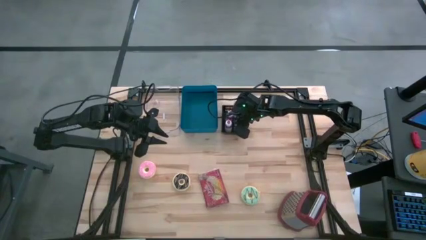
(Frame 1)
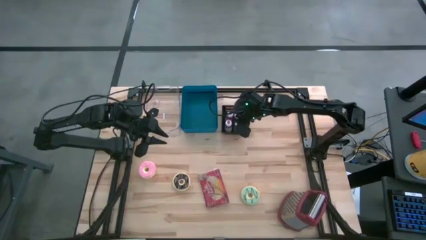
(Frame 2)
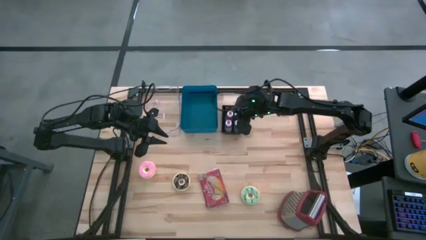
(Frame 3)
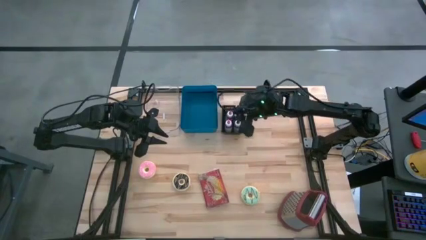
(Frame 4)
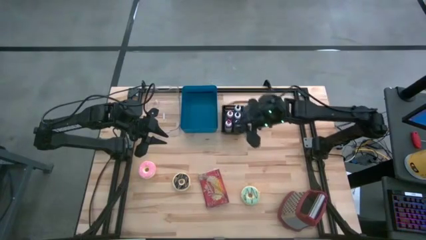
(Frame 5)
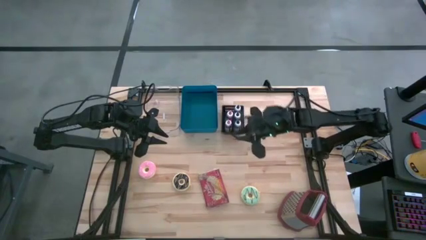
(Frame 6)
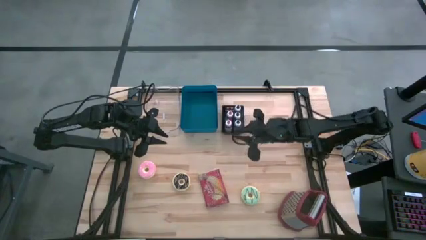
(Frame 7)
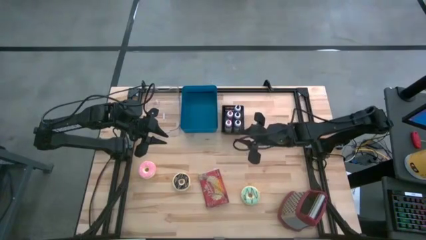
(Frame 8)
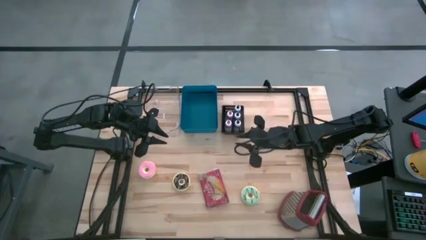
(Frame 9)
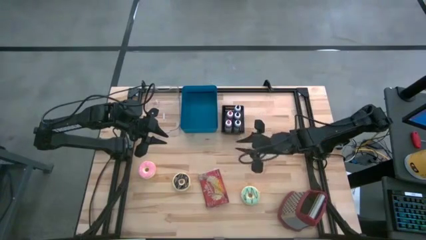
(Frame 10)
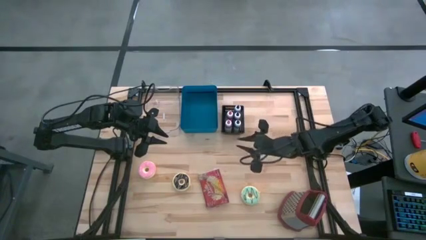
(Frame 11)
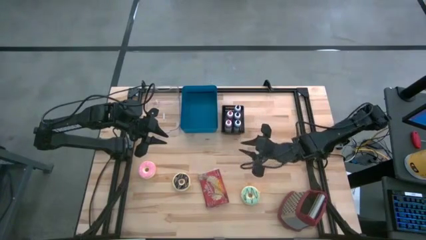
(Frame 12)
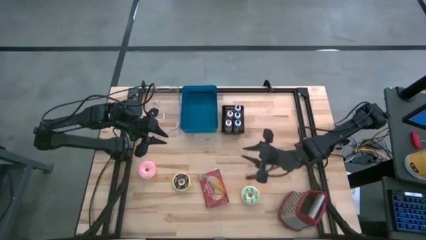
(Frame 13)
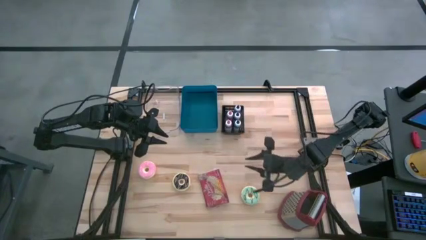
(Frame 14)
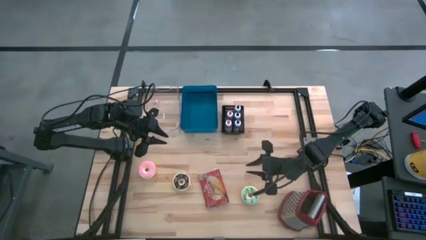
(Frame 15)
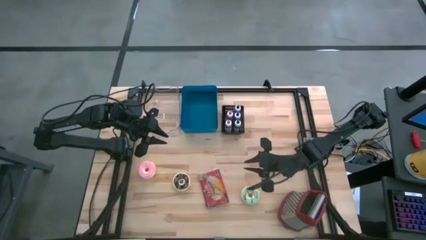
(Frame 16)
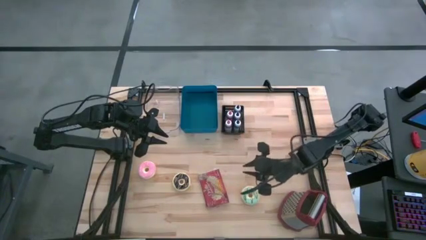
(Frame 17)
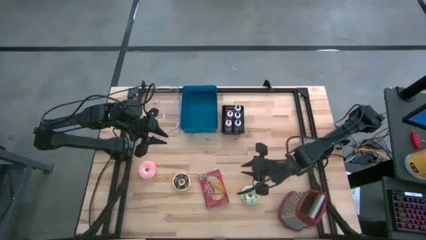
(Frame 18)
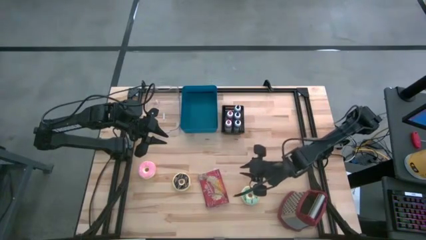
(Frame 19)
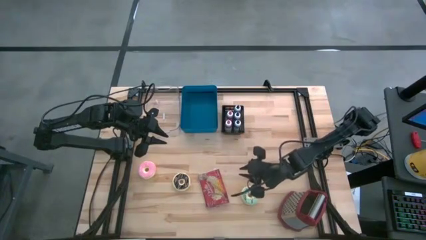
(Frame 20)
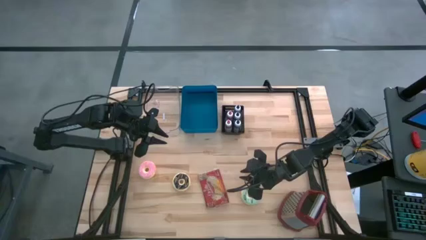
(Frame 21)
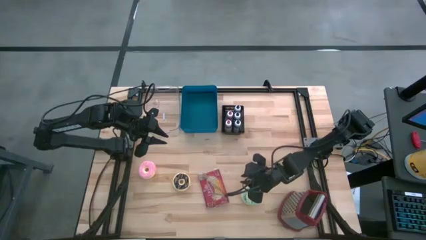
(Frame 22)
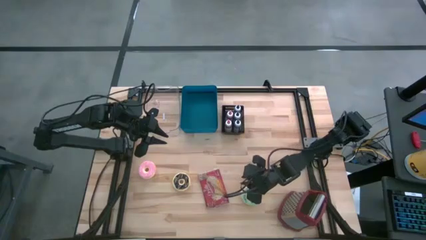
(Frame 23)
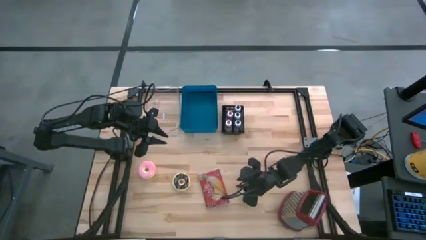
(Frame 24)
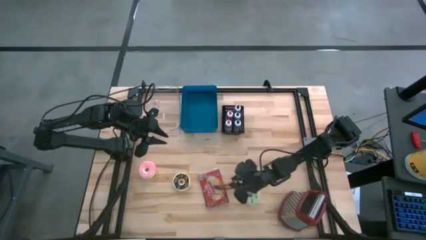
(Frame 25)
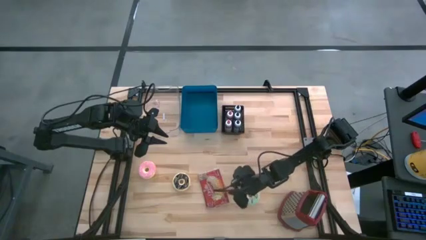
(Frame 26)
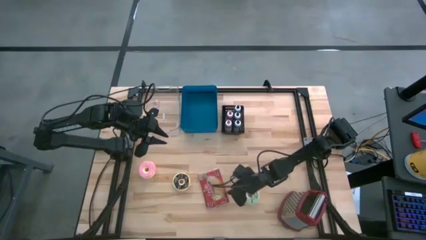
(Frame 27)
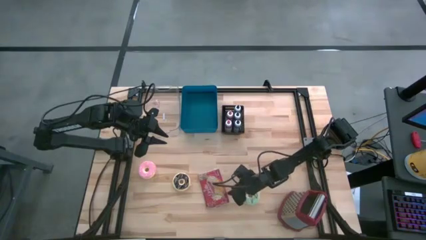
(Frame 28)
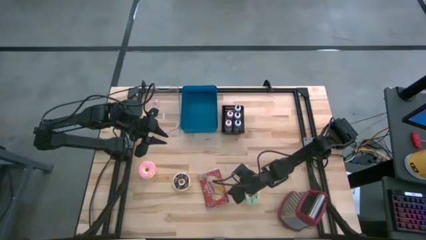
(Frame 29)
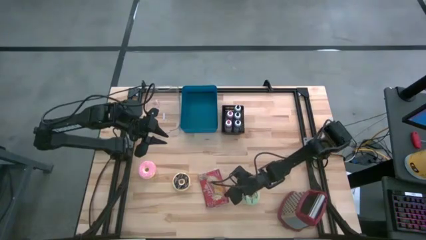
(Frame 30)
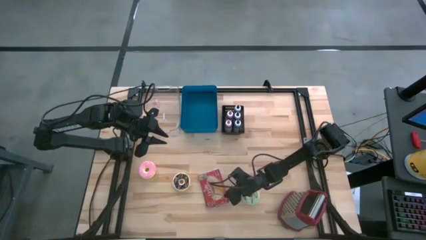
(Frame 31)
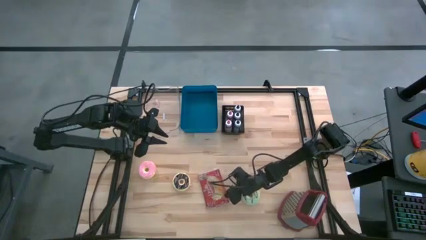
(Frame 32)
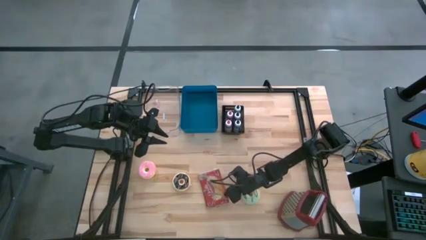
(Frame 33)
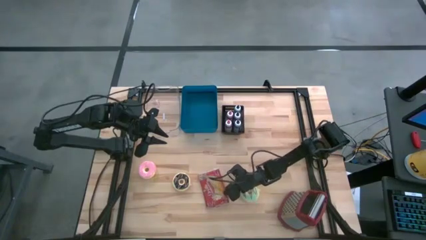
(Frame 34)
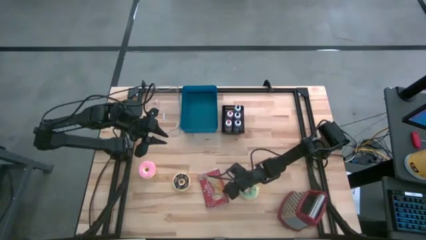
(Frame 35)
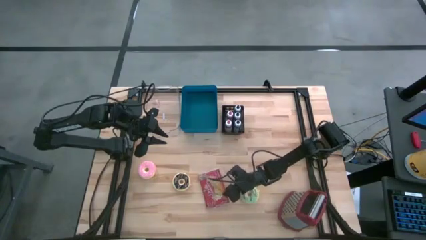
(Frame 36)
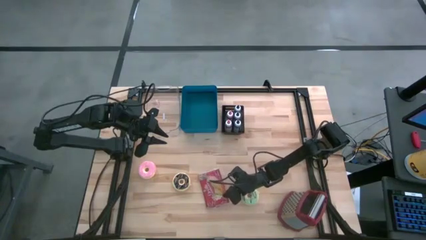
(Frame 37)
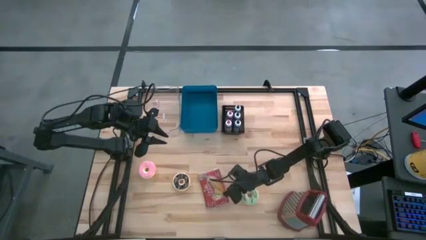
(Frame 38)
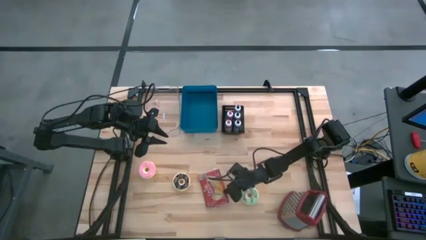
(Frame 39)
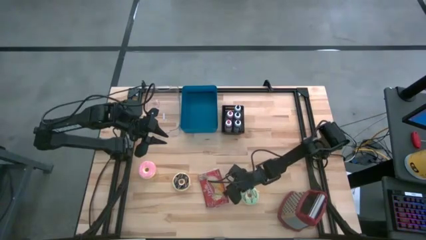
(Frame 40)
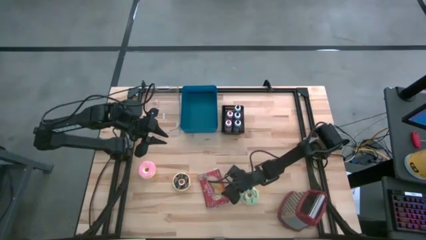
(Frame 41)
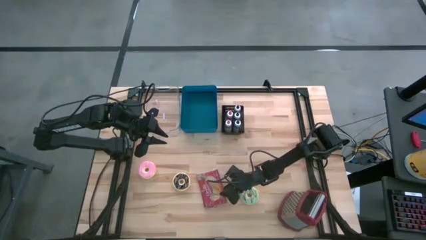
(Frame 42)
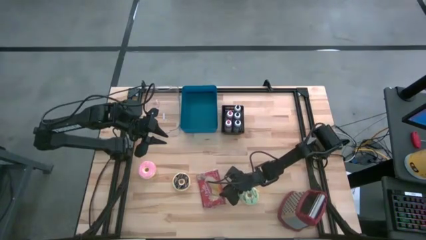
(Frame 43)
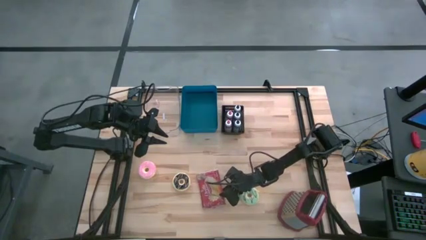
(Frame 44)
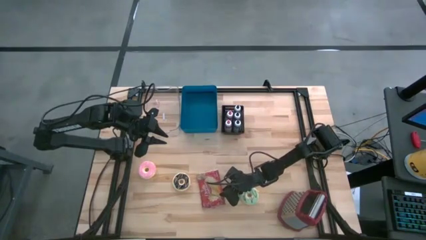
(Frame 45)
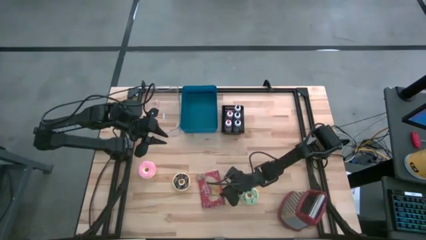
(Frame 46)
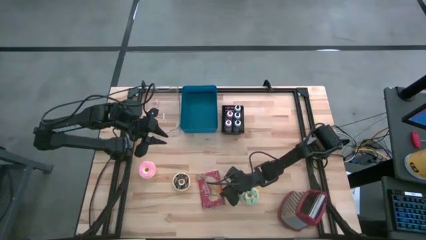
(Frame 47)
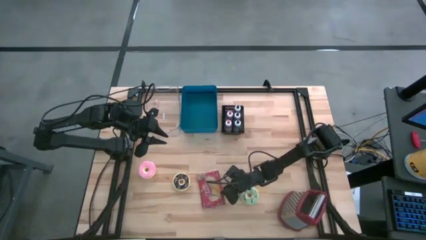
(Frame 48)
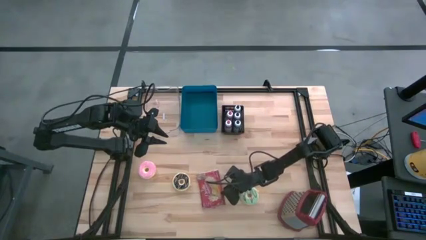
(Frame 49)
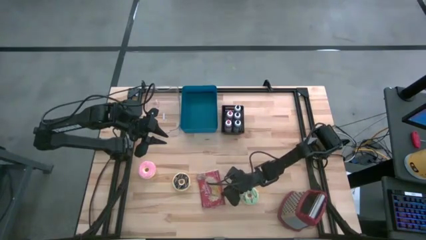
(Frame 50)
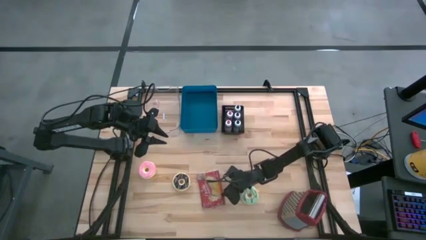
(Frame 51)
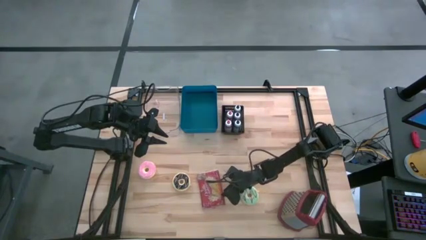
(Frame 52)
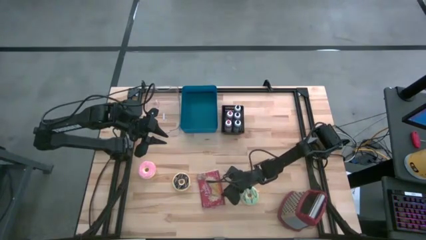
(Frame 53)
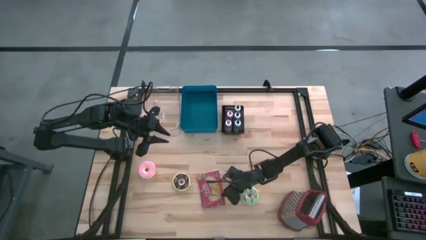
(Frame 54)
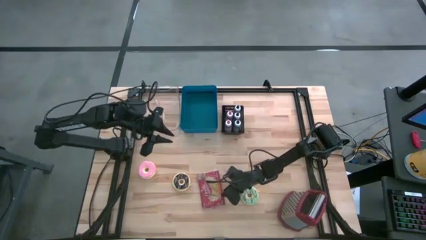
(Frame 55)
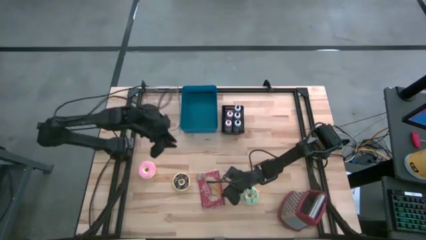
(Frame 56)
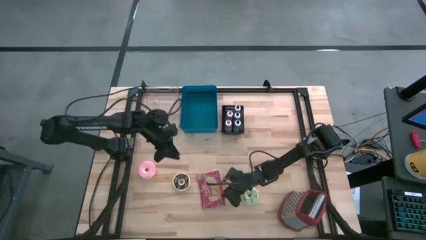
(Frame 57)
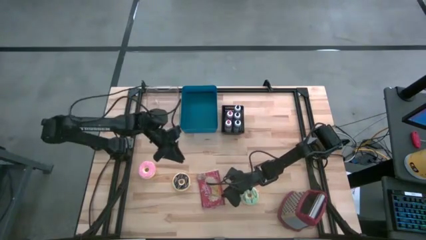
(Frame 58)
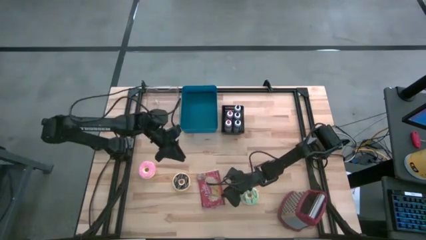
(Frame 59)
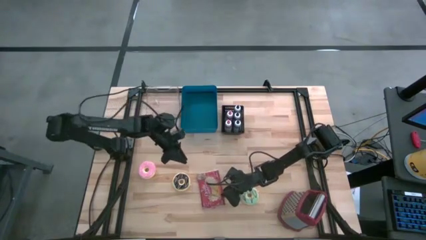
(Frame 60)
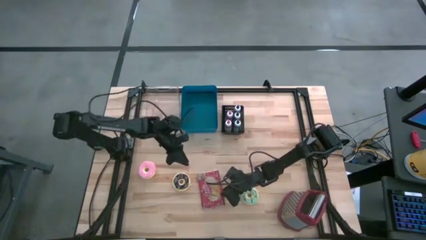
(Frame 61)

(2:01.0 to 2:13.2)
Put the popcorn bag into the blue bin
